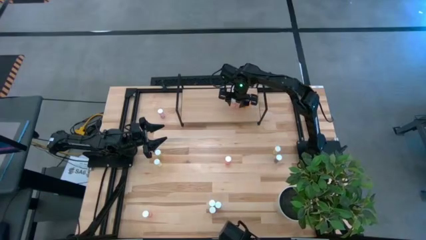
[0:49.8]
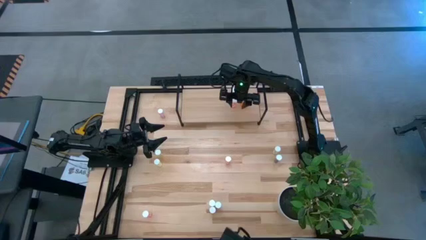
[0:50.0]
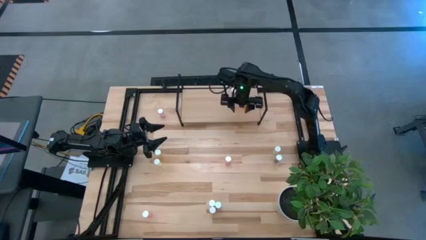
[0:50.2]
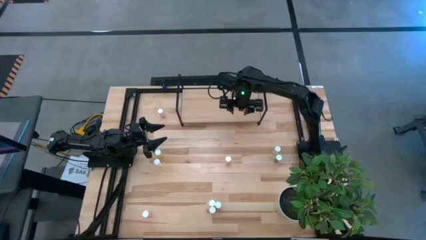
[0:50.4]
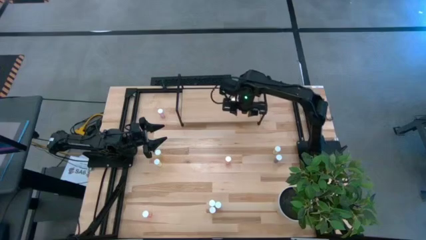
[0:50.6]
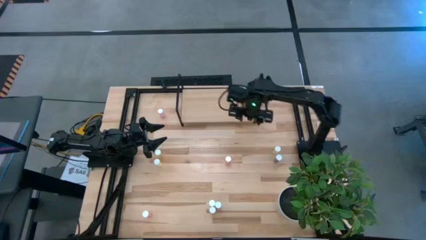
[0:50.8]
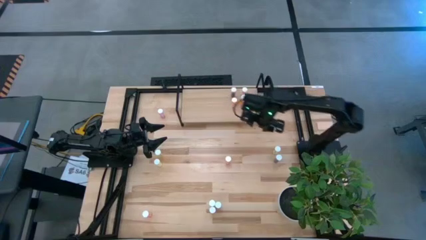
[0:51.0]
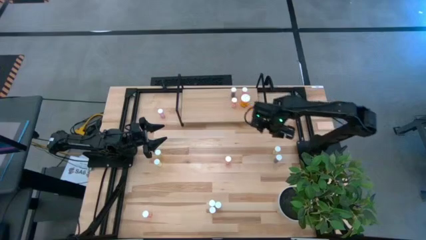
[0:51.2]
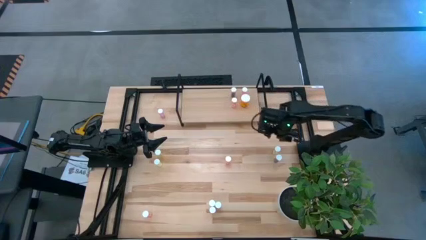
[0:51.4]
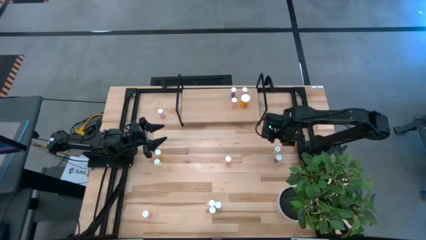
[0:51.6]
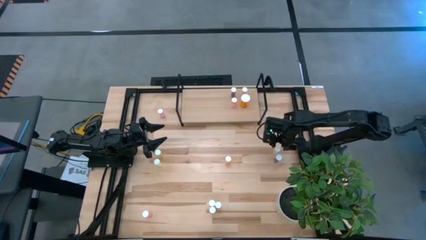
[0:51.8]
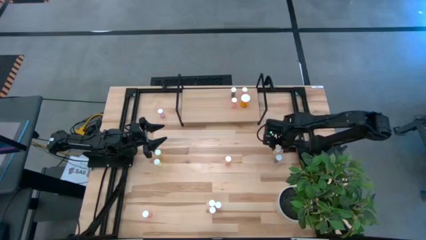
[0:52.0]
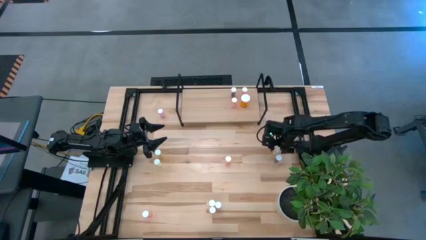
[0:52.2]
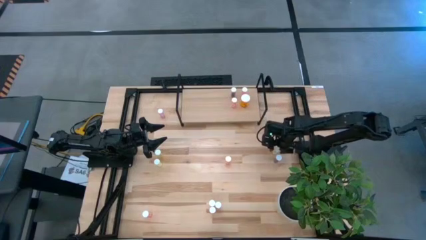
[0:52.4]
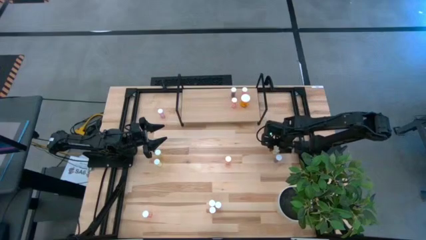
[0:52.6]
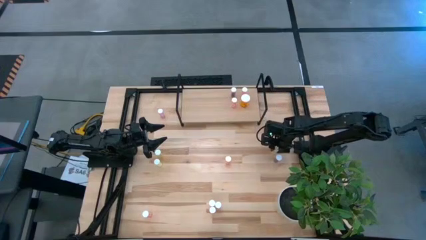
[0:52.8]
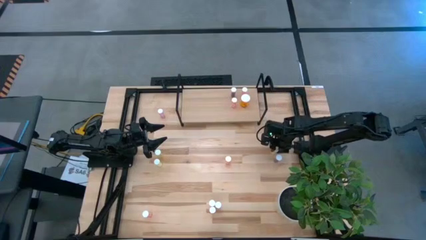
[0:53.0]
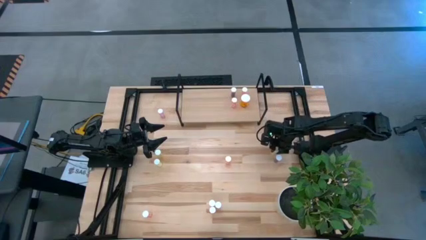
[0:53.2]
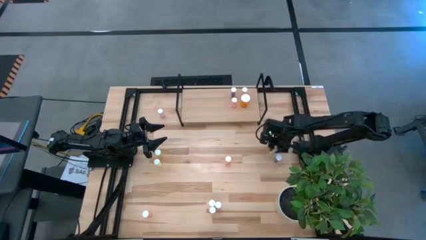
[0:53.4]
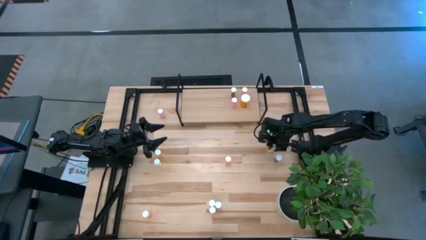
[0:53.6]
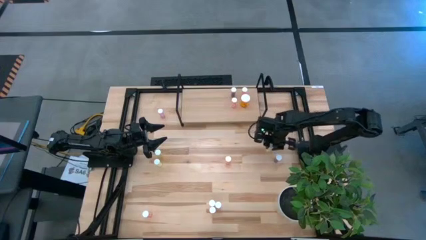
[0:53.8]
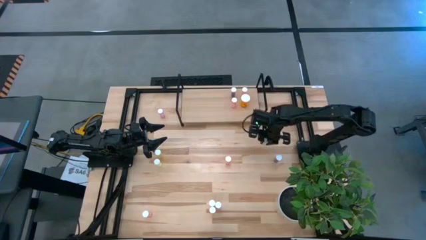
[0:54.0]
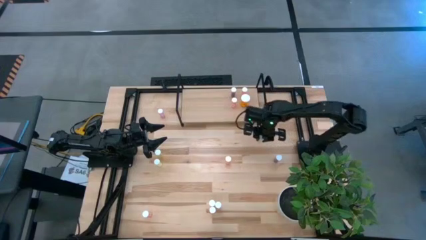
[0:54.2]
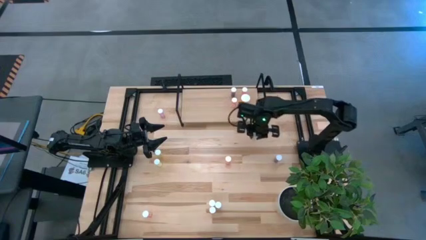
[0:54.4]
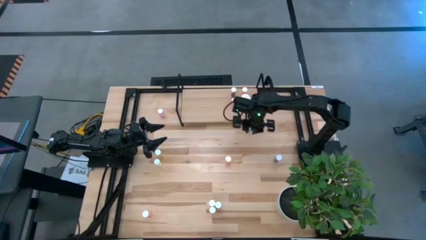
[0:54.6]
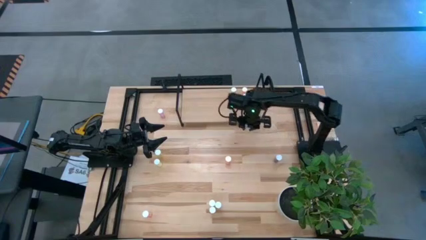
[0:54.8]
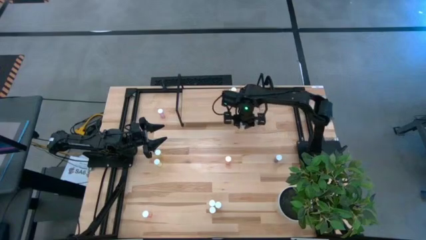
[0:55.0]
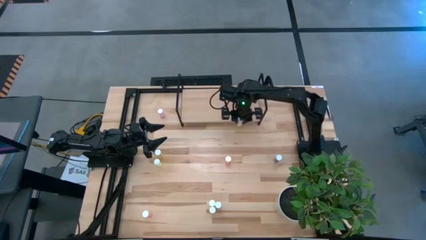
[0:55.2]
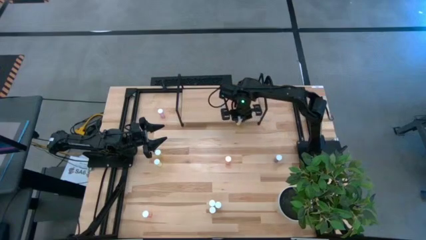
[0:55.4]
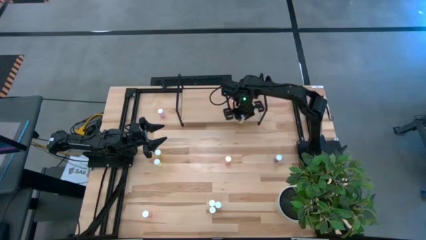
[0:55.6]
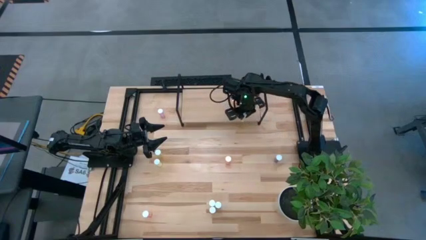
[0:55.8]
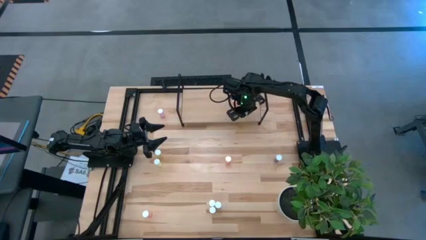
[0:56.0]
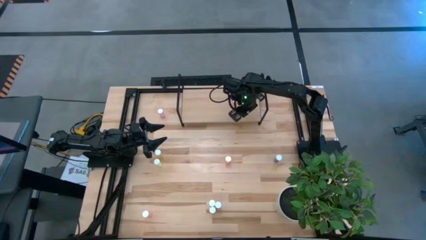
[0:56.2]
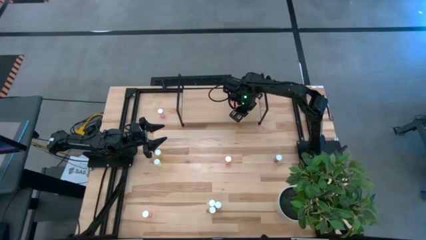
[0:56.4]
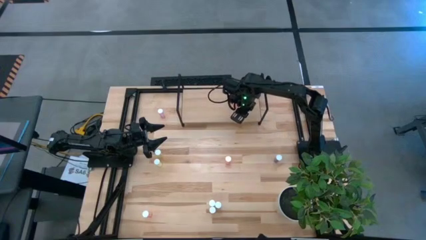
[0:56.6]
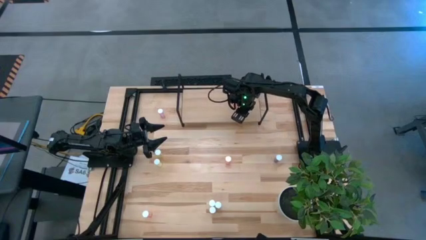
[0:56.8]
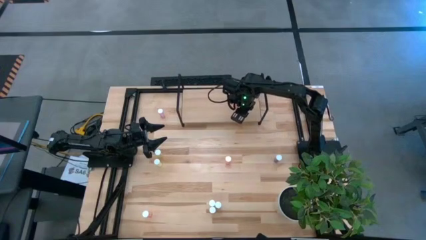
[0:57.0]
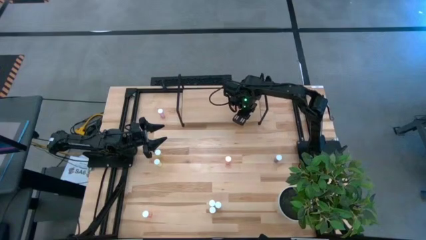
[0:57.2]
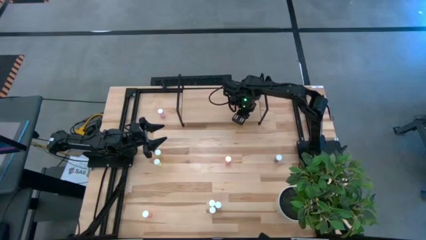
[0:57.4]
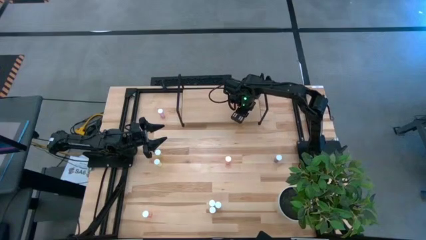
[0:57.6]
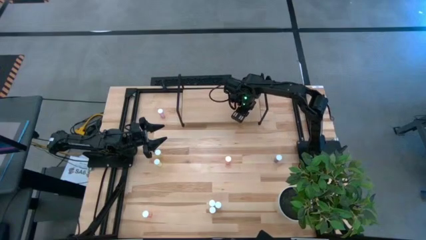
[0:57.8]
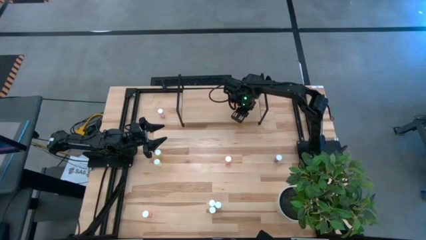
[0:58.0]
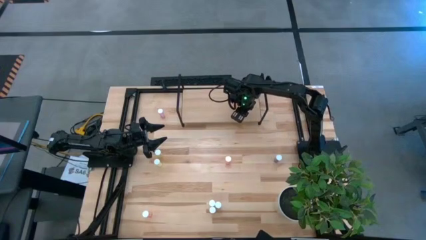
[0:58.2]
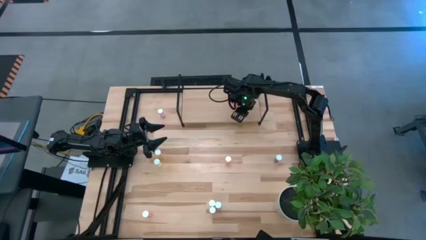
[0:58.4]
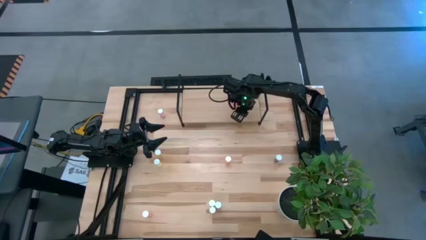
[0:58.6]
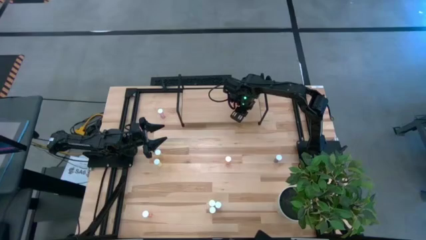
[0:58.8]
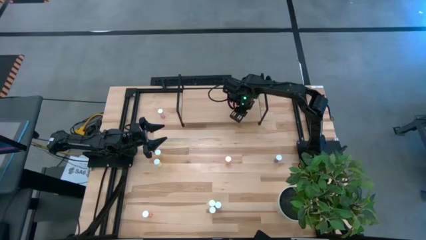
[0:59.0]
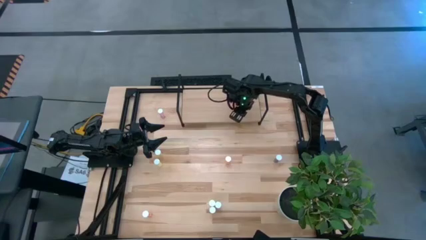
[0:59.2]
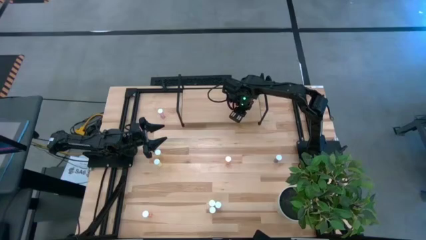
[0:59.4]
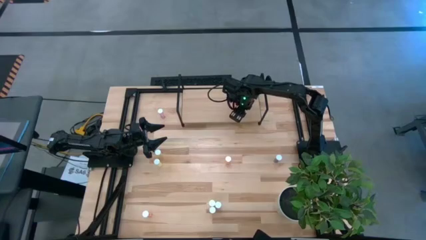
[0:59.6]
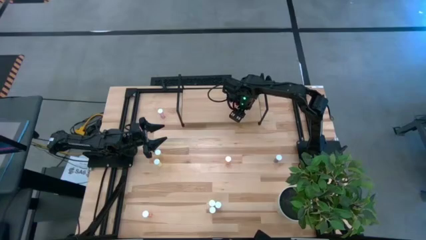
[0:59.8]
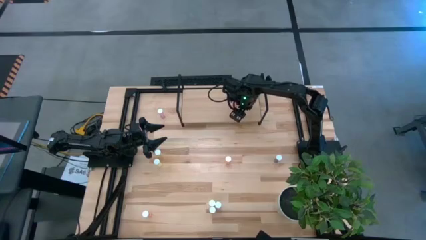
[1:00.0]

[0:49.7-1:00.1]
Task: Pick and place medicine bottles onto shelf by color
Put the yellow pill bottle on the shelf

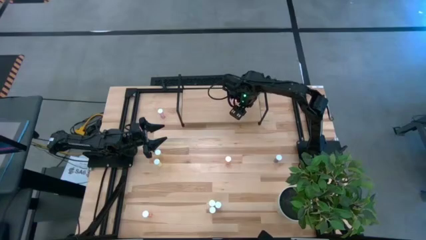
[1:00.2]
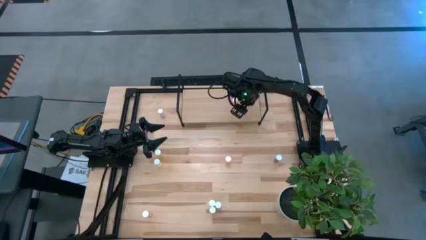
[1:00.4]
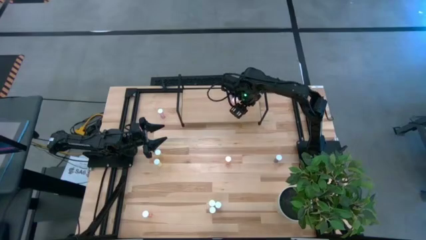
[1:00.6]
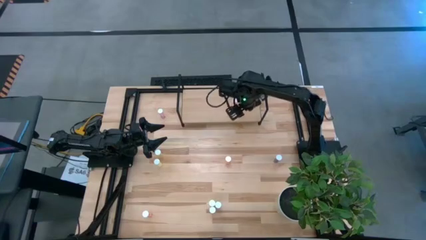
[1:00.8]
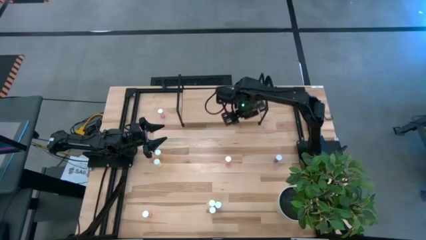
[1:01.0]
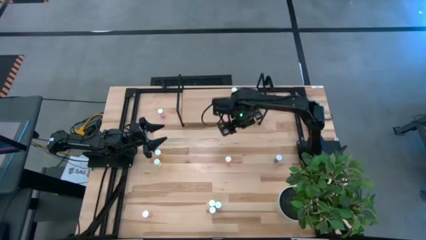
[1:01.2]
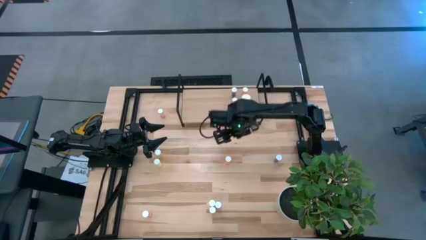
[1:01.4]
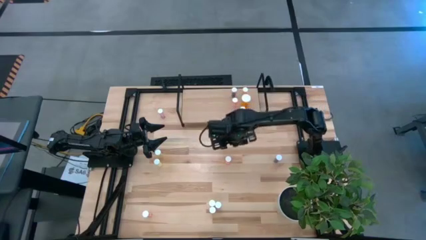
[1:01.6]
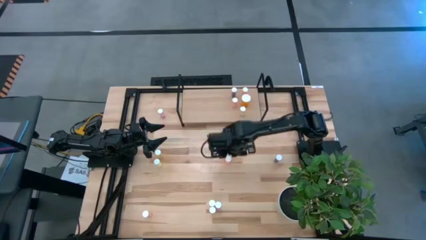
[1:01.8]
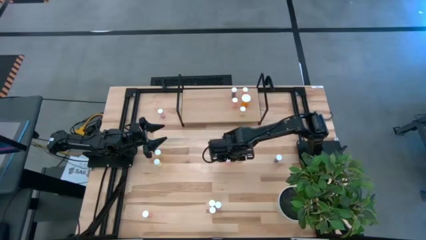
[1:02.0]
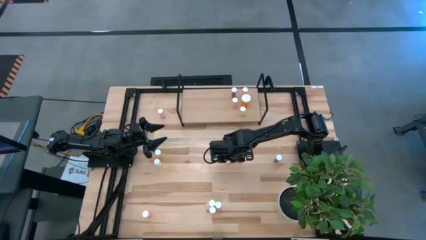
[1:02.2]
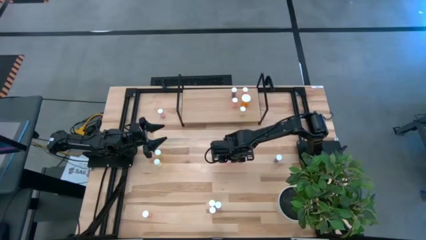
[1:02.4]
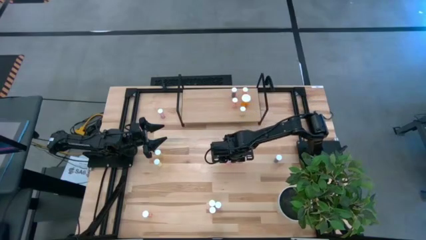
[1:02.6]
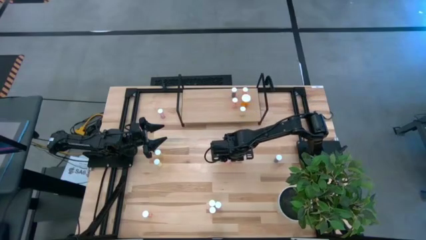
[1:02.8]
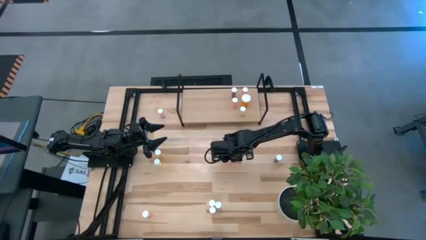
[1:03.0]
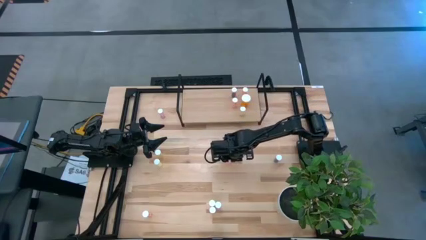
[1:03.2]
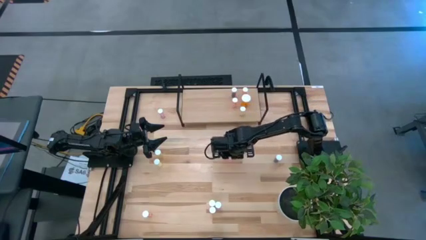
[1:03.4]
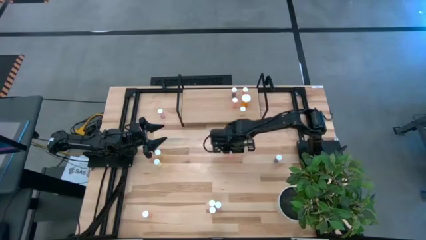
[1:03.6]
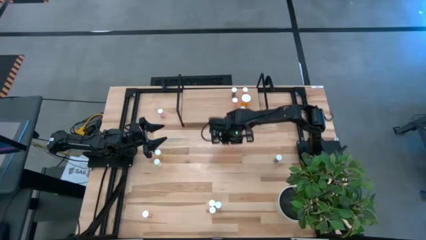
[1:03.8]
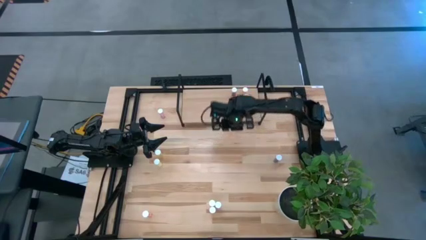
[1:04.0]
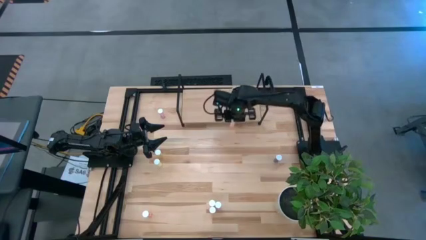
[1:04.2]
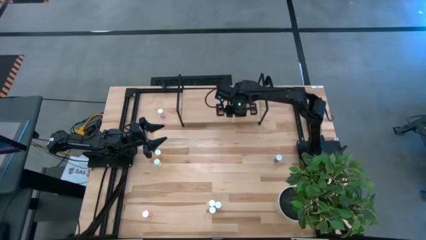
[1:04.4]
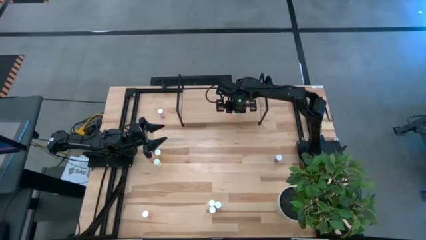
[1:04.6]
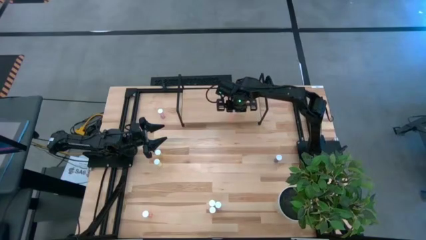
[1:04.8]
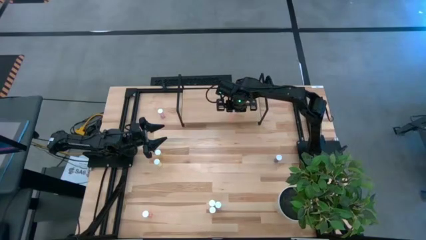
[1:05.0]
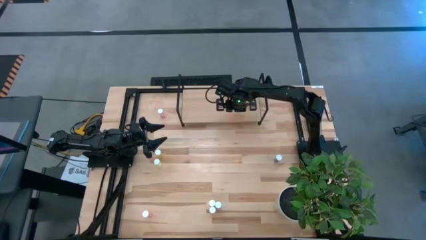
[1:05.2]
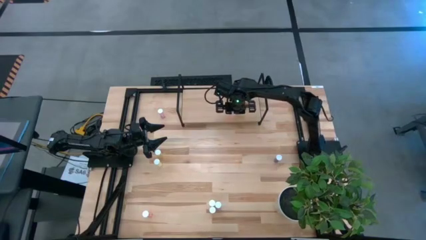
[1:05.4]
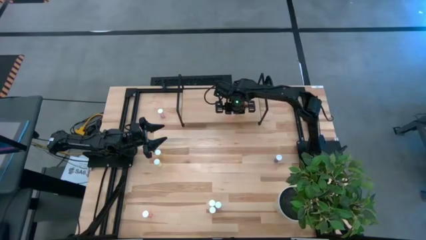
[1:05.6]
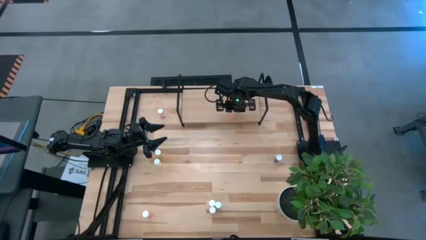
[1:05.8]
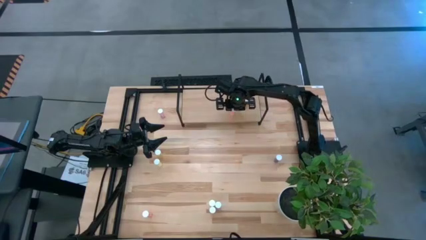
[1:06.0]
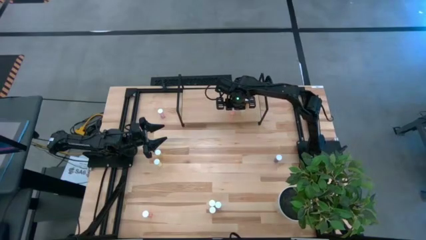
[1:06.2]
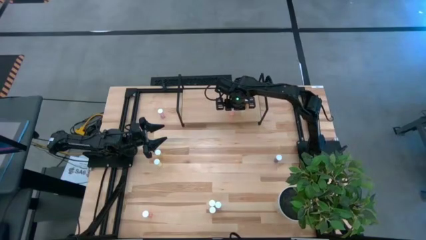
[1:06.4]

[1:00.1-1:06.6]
Put the pink pill bottle on the shelf
